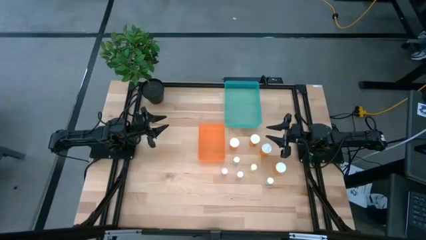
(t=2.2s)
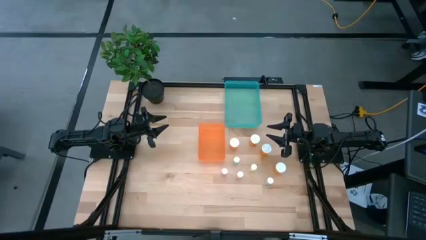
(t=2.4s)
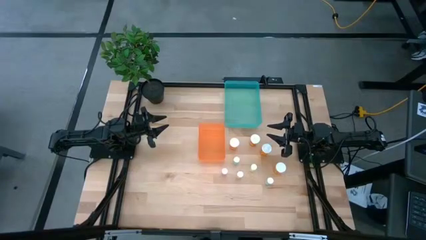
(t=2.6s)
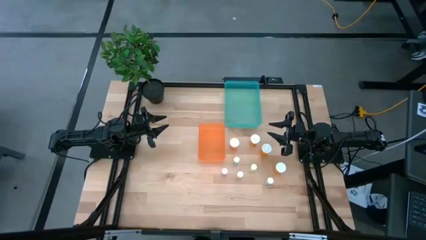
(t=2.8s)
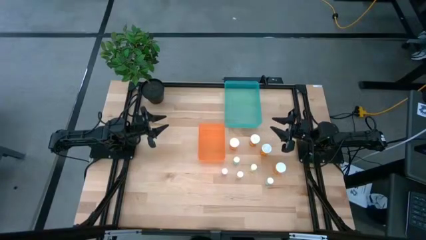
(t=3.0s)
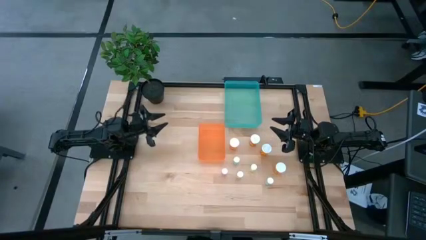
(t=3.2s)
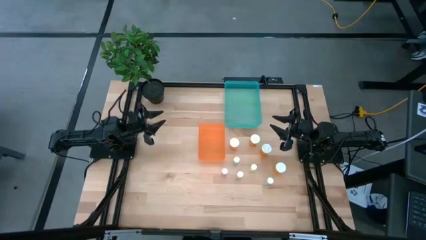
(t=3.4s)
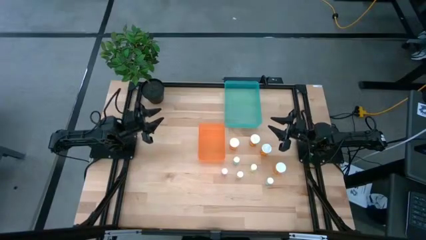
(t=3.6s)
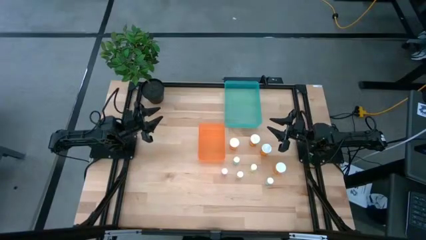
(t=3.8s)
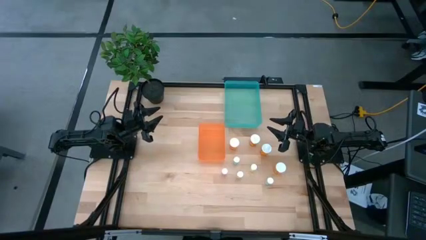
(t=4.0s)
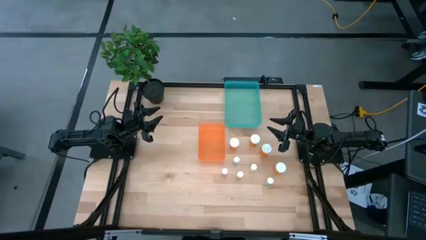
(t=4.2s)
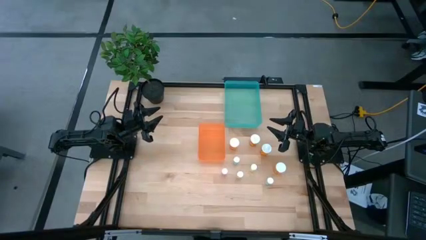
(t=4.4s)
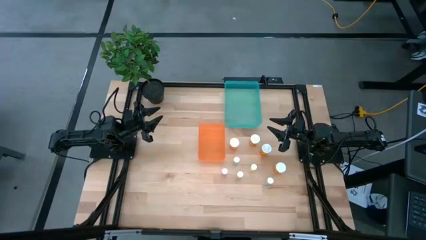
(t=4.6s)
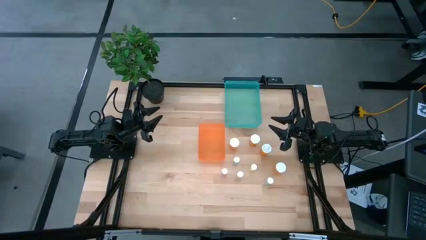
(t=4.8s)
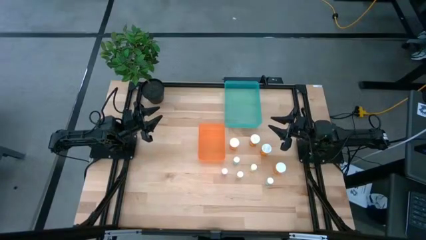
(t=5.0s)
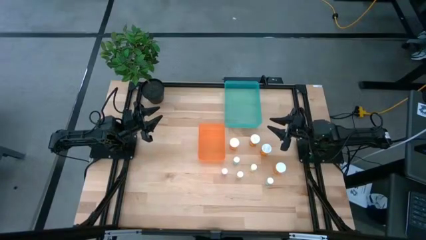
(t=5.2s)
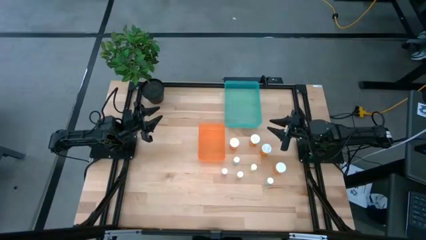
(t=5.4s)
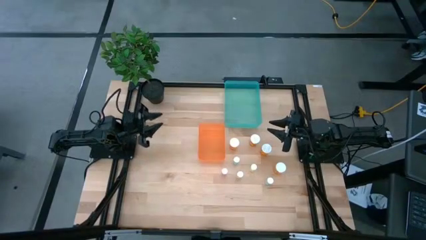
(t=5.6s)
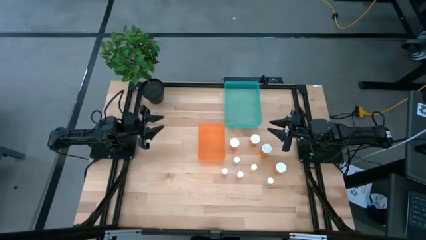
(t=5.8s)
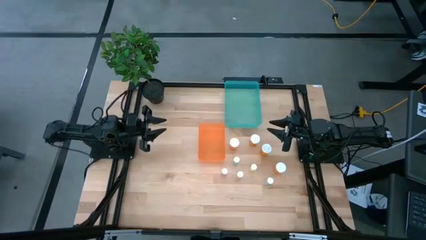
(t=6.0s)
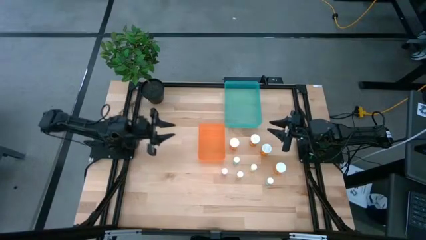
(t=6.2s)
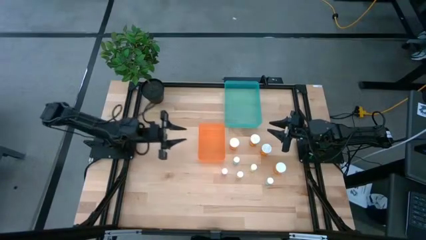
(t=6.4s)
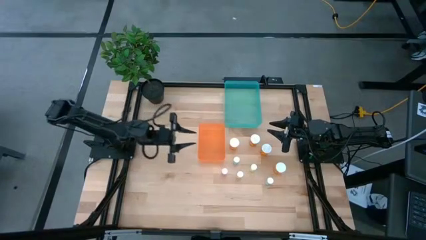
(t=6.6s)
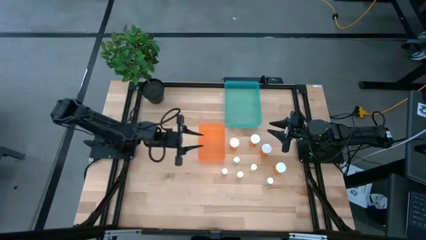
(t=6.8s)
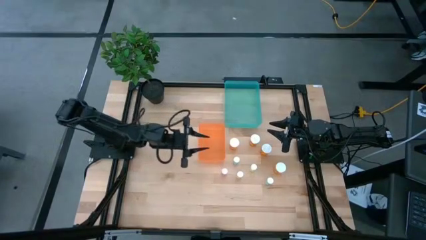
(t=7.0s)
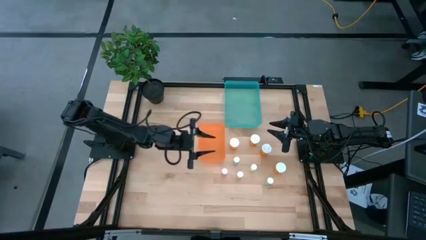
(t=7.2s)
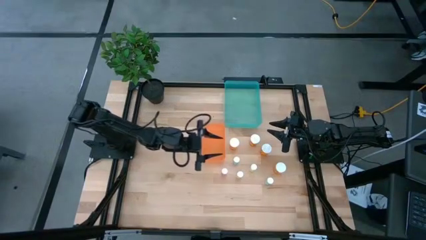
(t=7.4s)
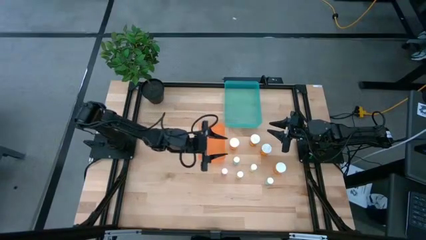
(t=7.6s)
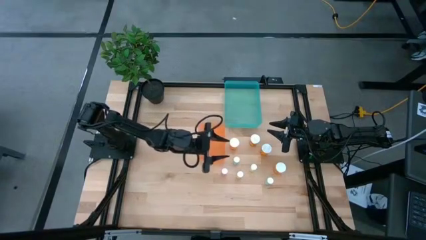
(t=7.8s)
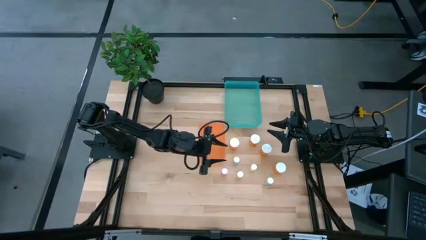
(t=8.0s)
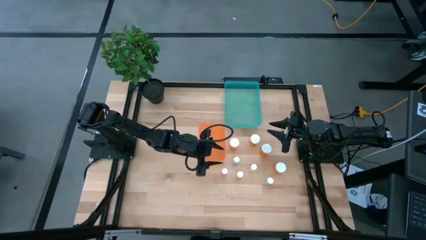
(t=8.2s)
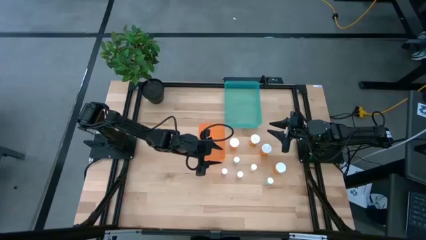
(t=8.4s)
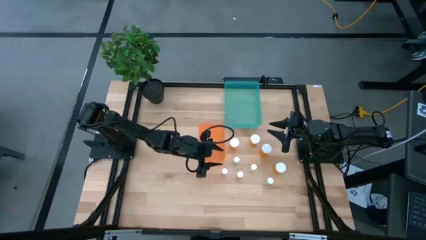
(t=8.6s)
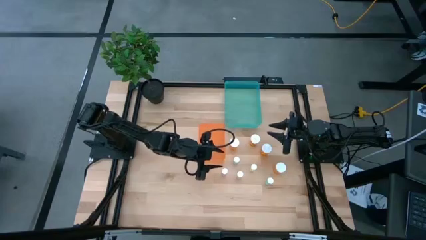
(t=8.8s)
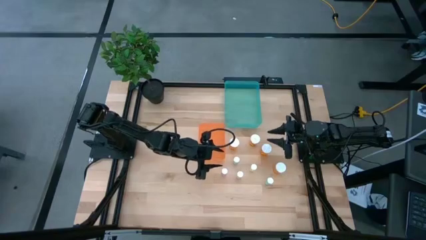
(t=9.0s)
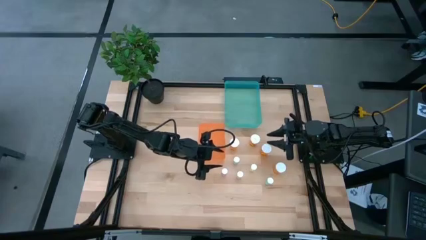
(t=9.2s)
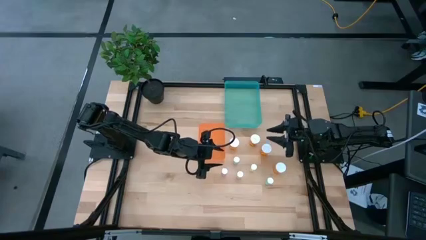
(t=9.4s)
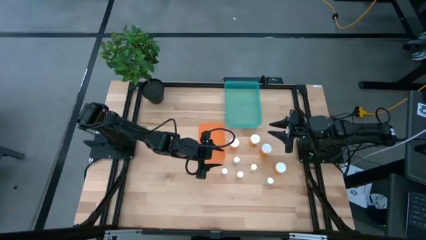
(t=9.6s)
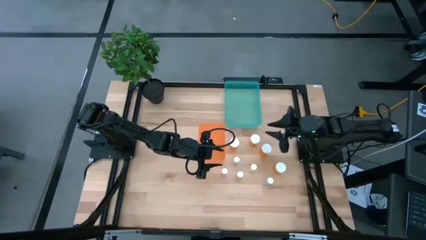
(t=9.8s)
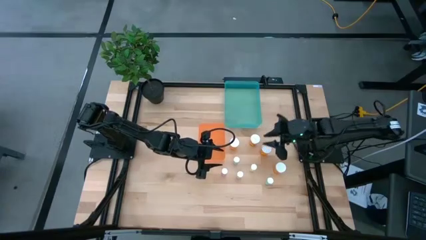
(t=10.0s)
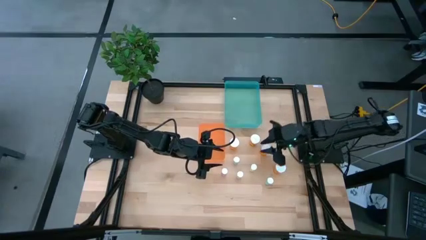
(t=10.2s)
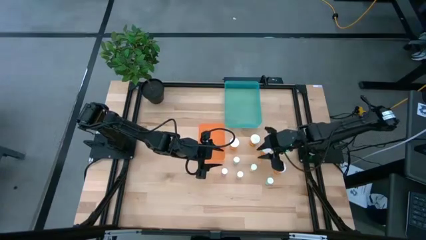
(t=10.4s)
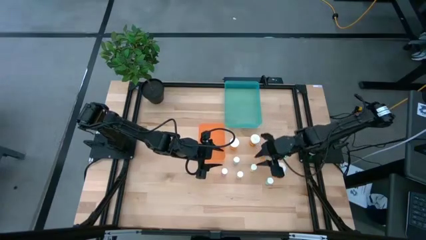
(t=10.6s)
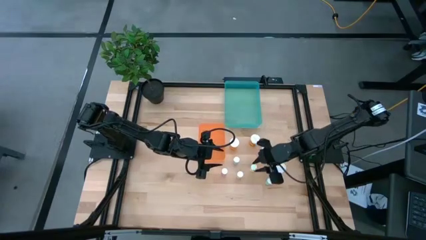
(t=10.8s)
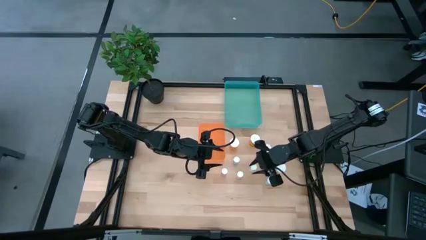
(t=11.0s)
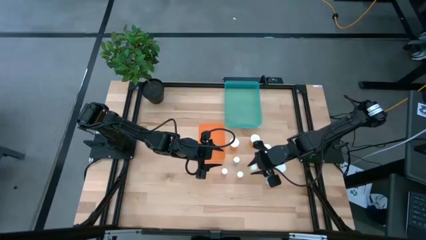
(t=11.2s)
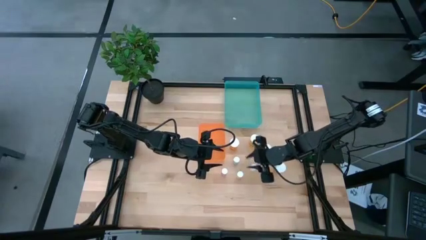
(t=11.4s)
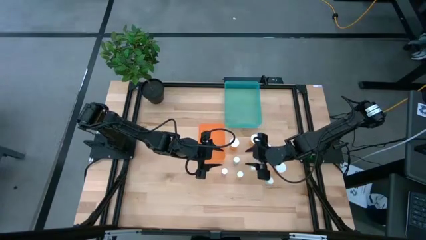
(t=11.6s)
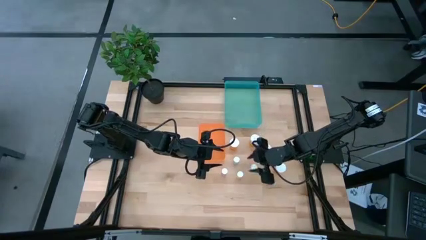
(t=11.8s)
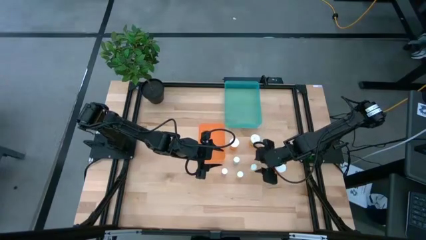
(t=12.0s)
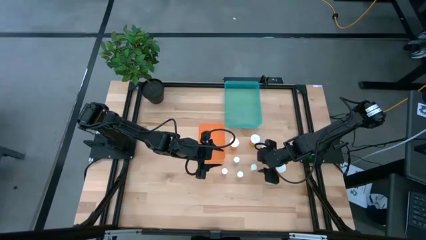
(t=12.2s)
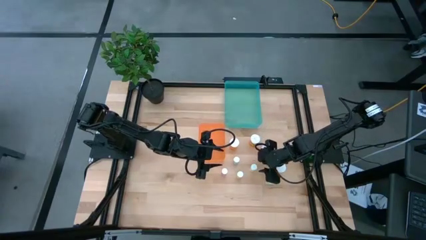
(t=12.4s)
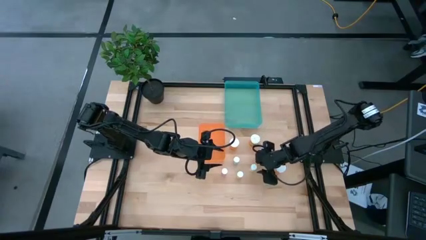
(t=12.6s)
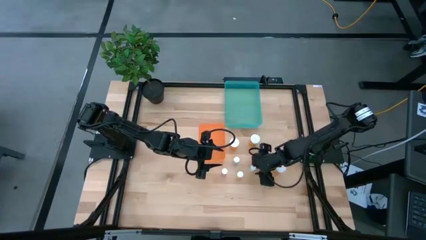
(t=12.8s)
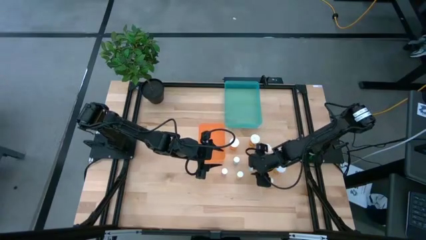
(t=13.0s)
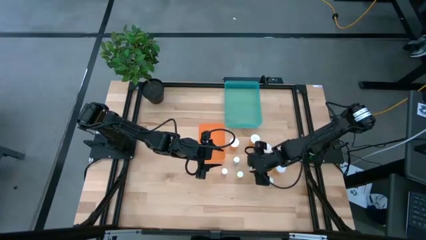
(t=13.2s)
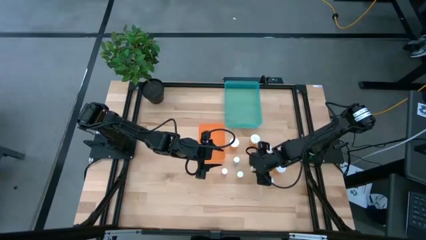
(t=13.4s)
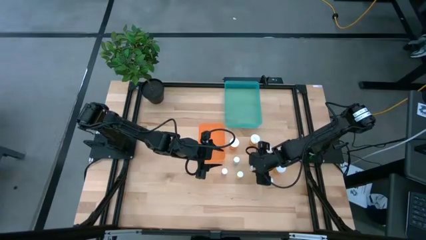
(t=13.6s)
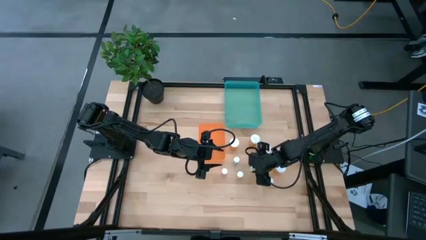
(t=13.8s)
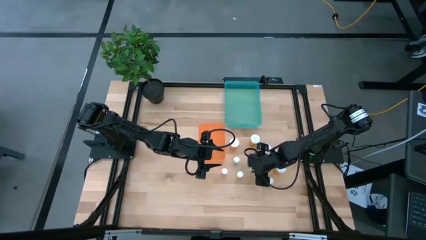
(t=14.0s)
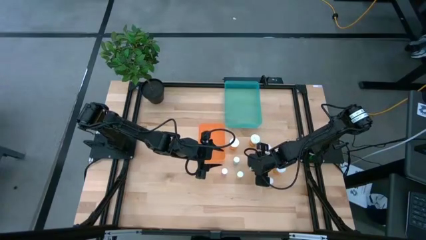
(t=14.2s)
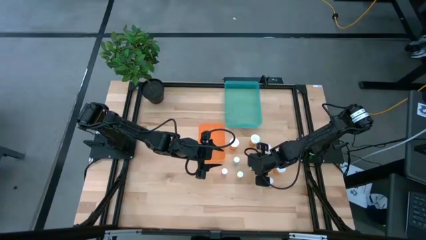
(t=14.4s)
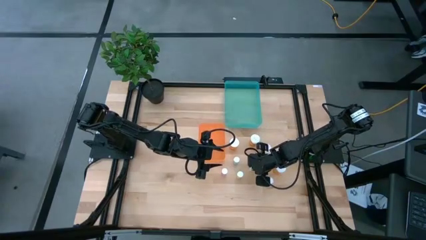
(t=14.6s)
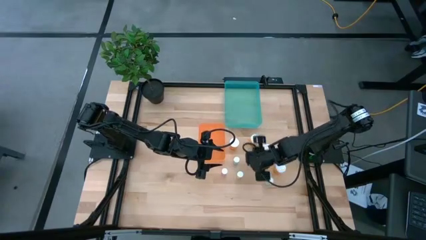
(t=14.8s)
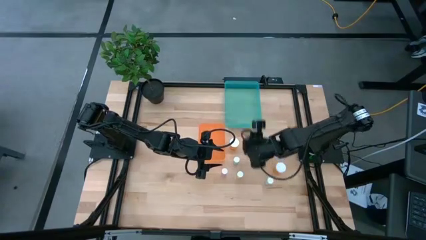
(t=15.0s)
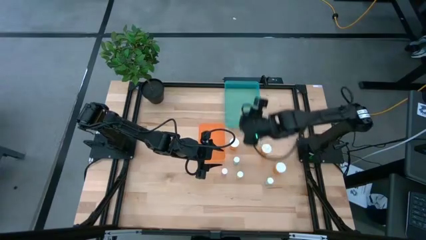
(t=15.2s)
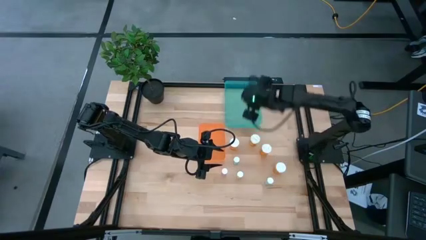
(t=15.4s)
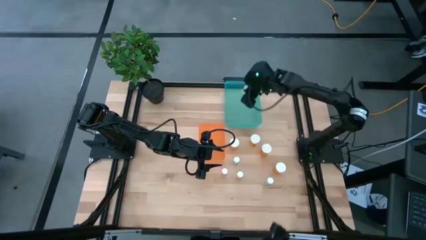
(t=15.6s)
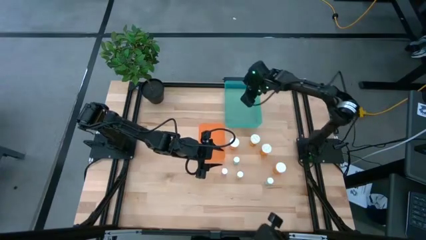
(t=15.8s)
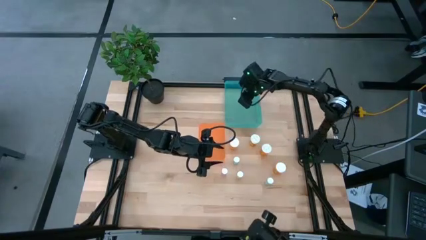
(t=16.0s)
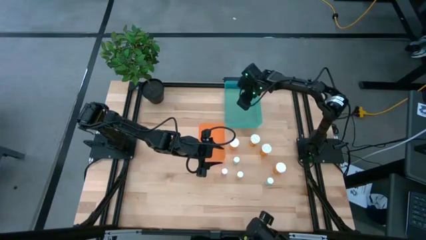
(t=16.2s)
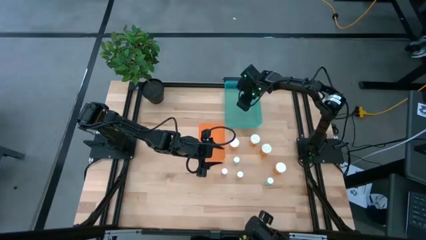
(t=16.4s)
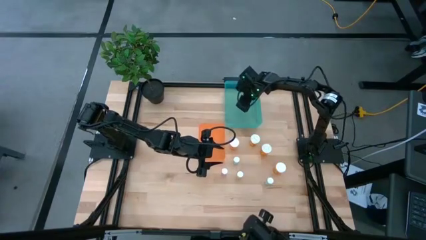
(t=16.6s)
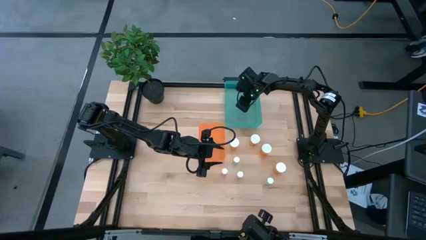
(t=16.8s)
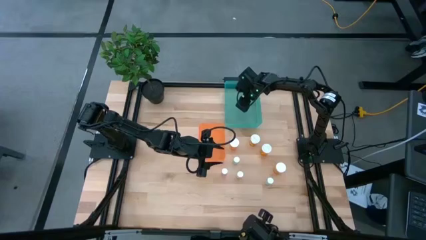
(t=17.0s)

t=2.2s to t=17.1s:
Task: Pick and place medicine bottles into bin by pill shape (circle, oval)
Put the right yellow tablet bottle into the green bin
